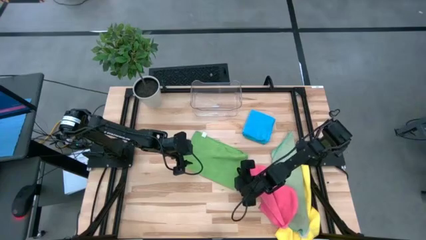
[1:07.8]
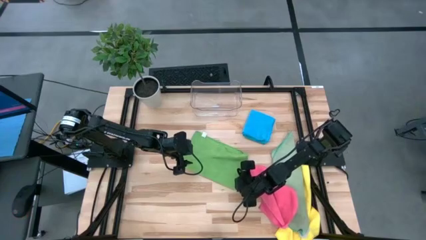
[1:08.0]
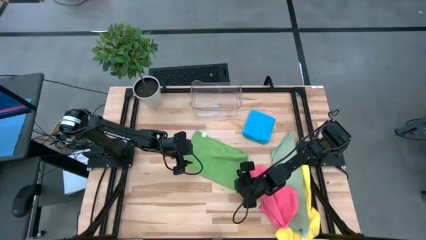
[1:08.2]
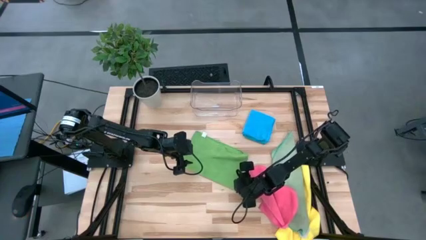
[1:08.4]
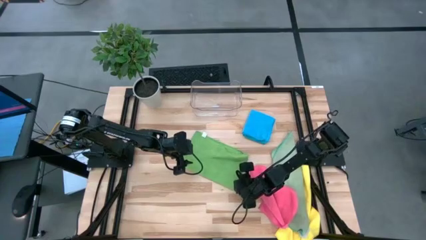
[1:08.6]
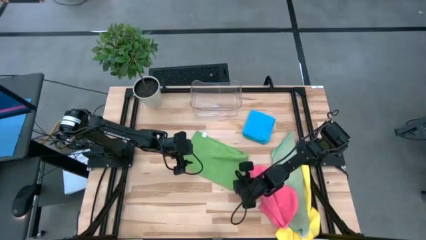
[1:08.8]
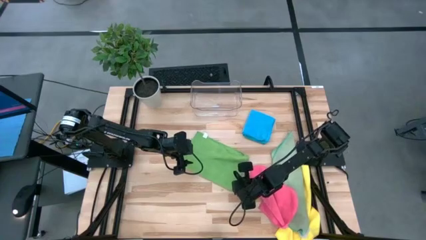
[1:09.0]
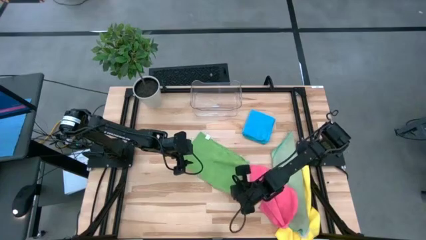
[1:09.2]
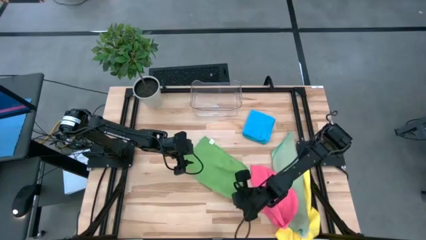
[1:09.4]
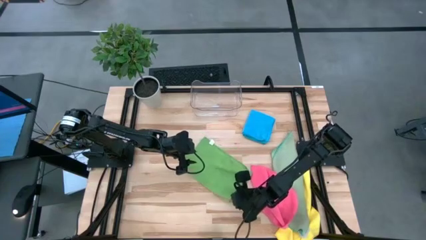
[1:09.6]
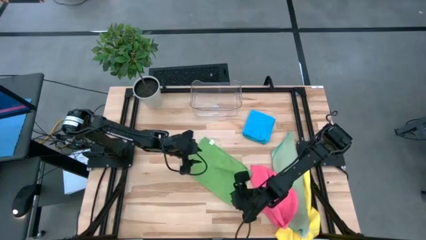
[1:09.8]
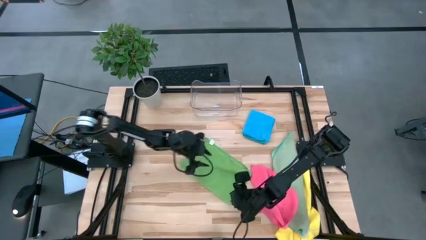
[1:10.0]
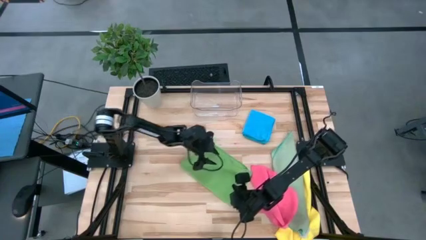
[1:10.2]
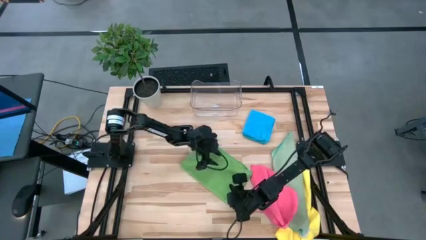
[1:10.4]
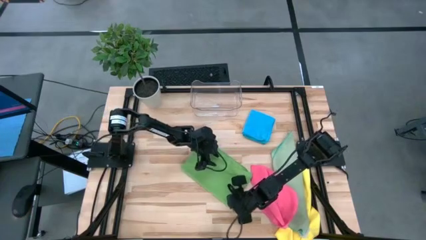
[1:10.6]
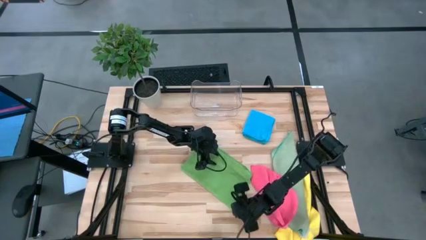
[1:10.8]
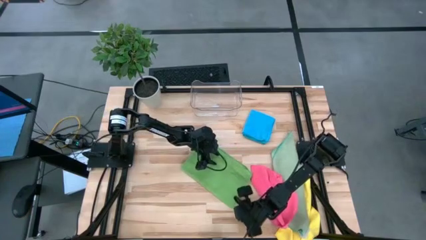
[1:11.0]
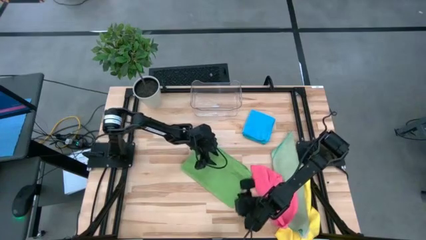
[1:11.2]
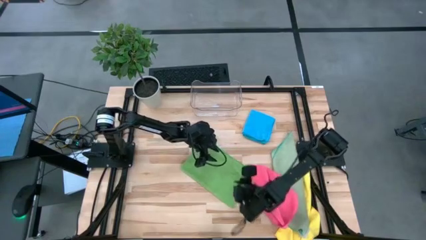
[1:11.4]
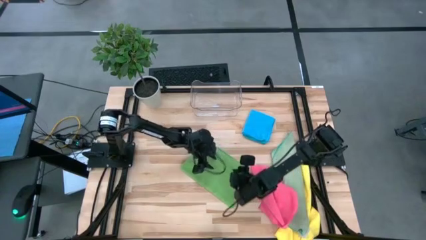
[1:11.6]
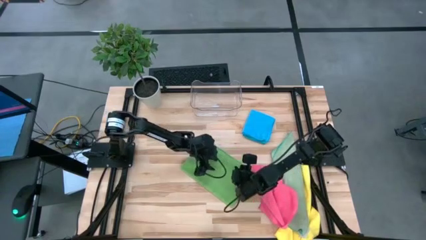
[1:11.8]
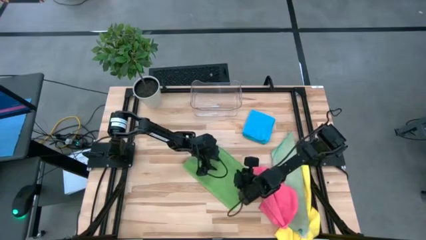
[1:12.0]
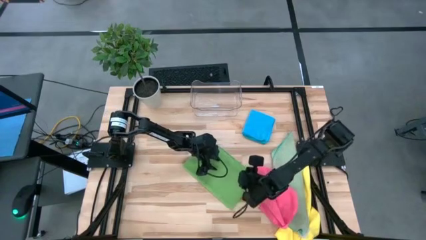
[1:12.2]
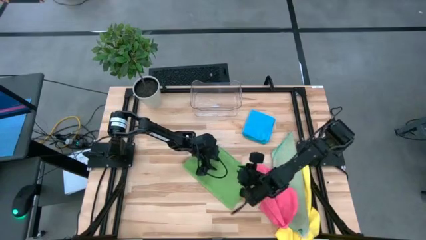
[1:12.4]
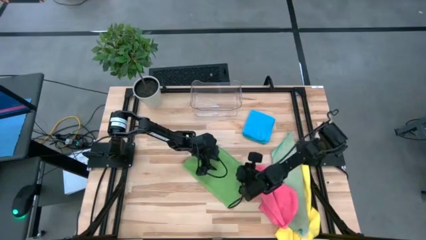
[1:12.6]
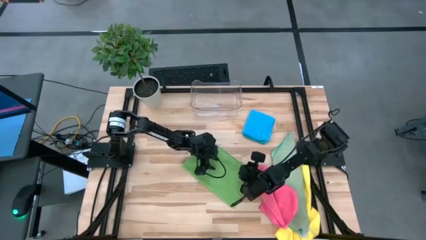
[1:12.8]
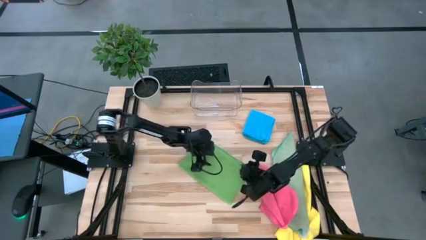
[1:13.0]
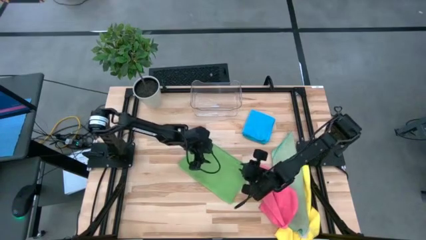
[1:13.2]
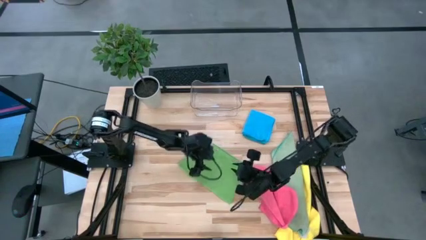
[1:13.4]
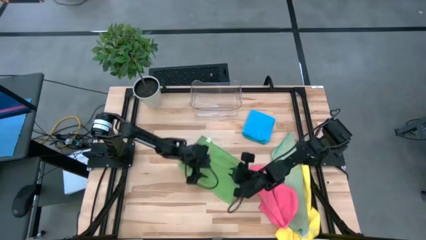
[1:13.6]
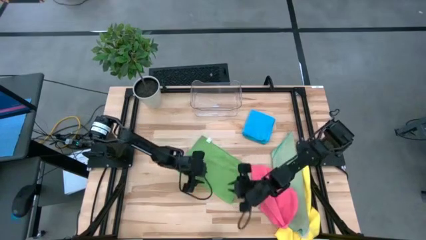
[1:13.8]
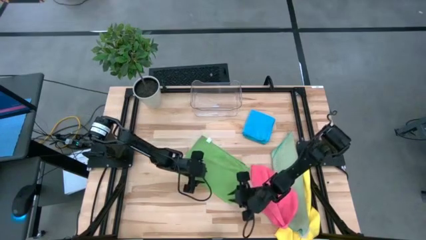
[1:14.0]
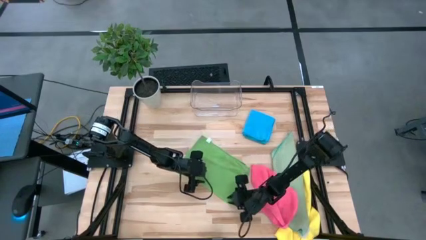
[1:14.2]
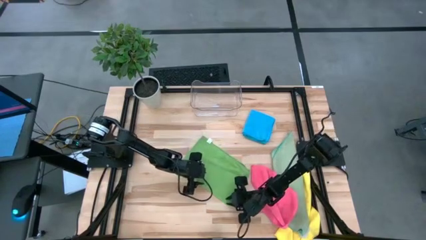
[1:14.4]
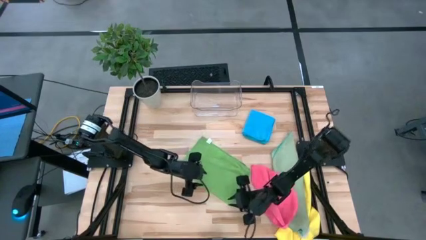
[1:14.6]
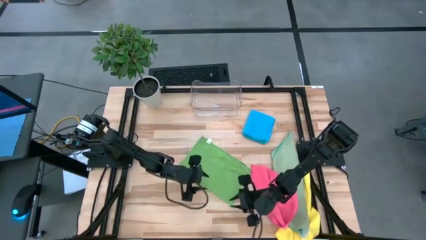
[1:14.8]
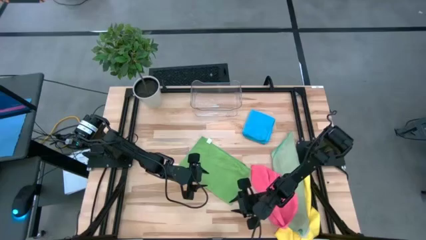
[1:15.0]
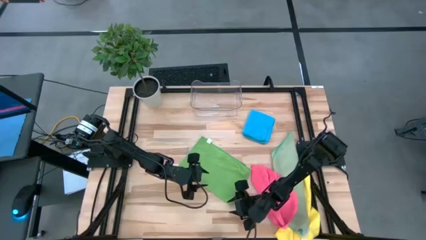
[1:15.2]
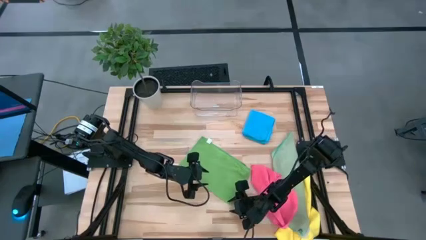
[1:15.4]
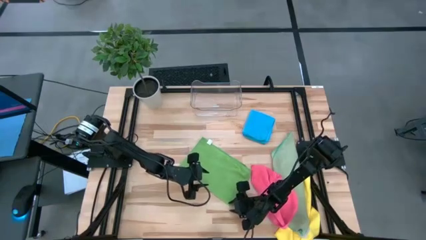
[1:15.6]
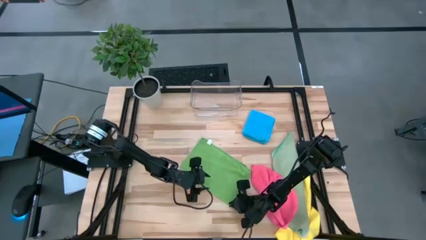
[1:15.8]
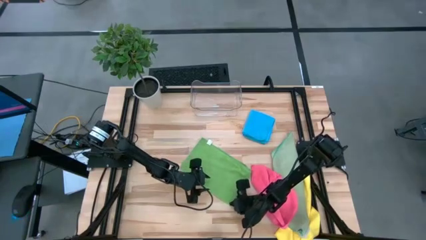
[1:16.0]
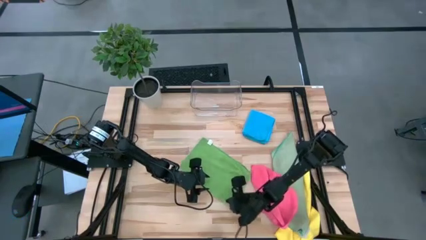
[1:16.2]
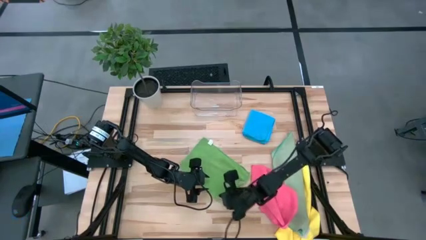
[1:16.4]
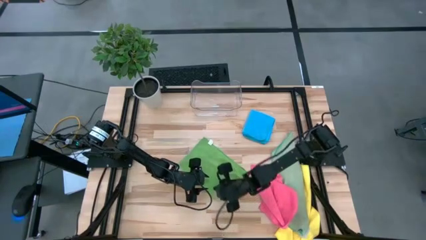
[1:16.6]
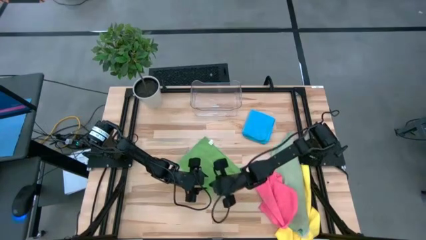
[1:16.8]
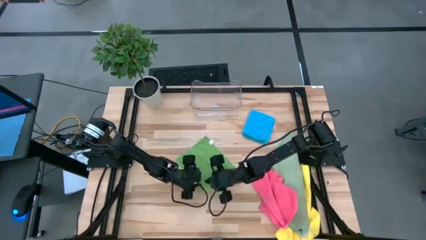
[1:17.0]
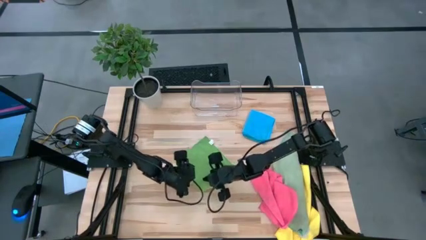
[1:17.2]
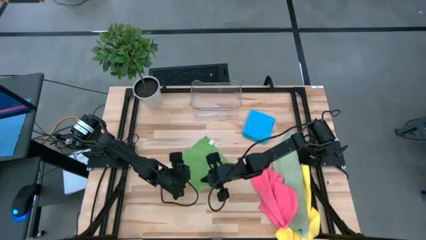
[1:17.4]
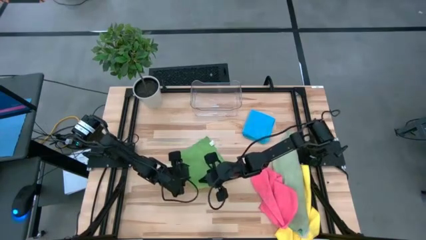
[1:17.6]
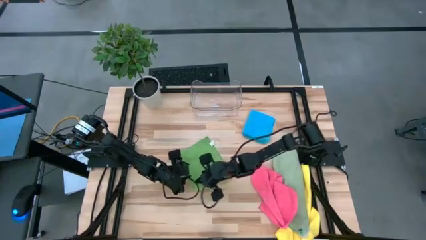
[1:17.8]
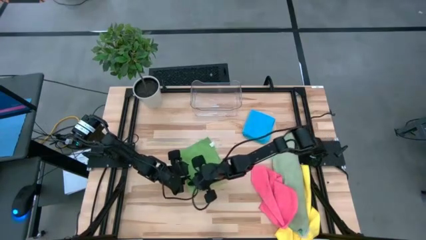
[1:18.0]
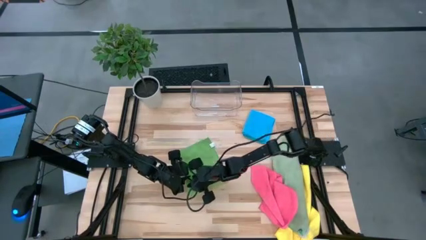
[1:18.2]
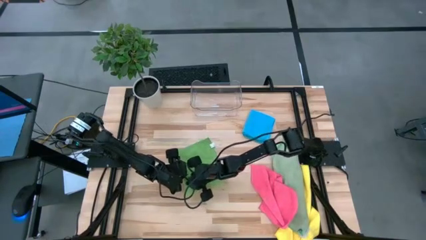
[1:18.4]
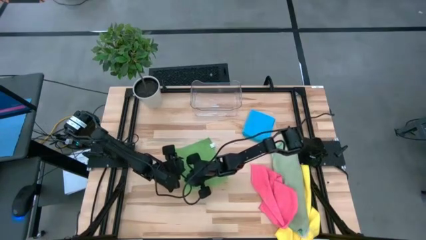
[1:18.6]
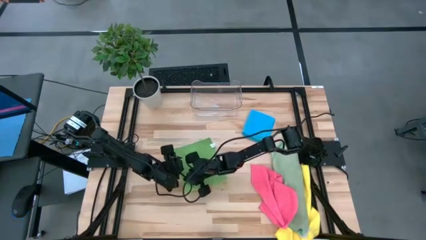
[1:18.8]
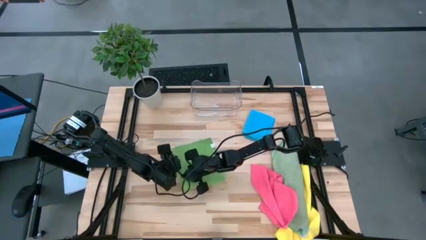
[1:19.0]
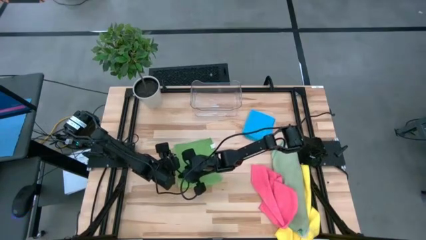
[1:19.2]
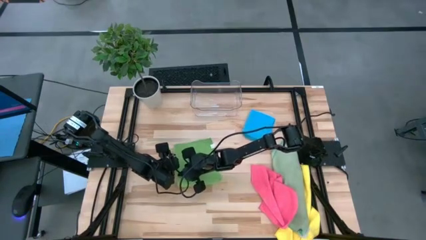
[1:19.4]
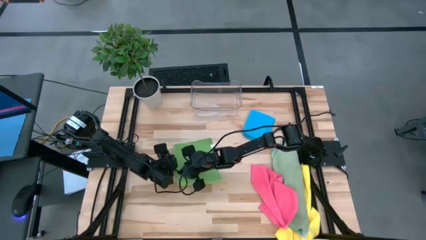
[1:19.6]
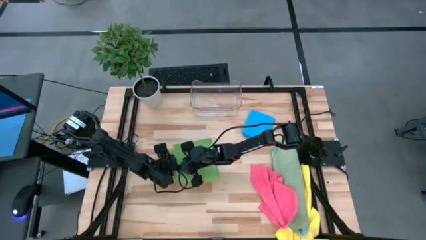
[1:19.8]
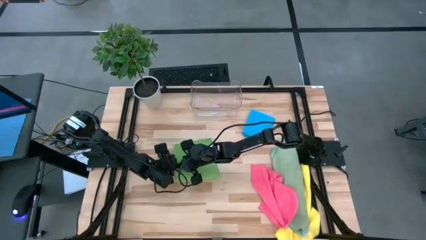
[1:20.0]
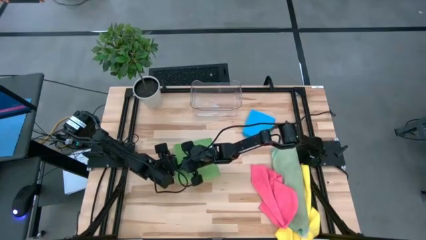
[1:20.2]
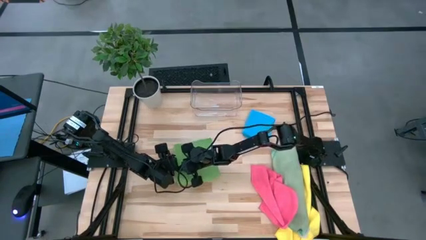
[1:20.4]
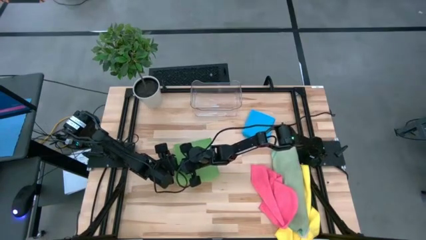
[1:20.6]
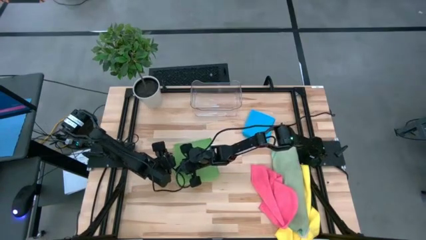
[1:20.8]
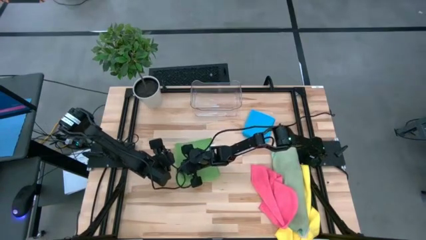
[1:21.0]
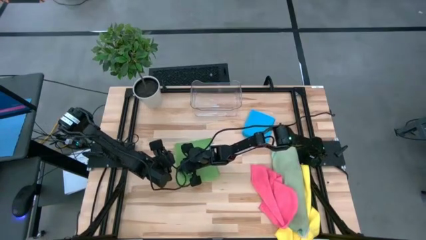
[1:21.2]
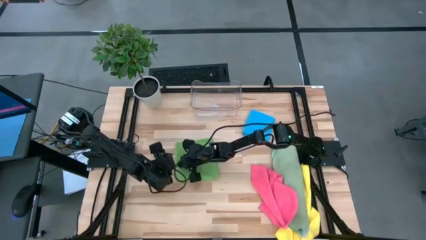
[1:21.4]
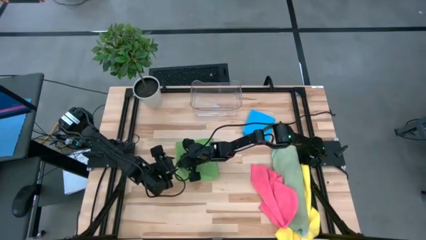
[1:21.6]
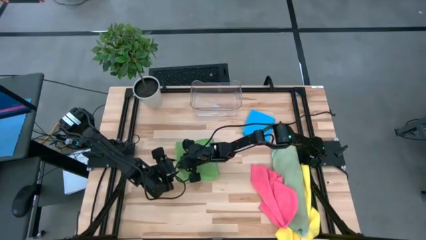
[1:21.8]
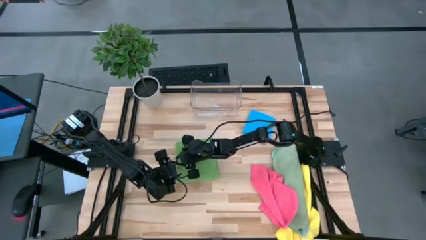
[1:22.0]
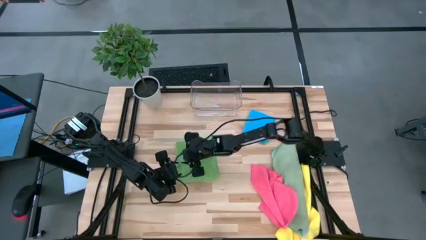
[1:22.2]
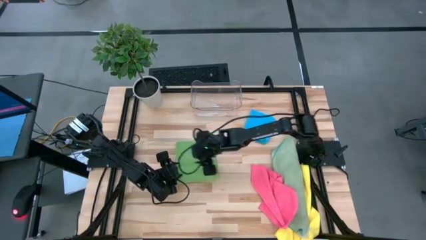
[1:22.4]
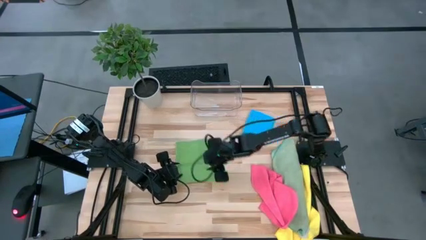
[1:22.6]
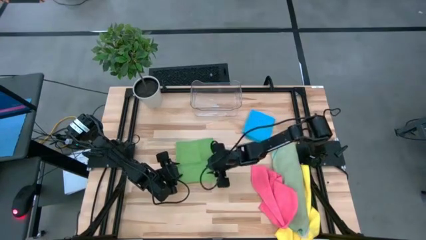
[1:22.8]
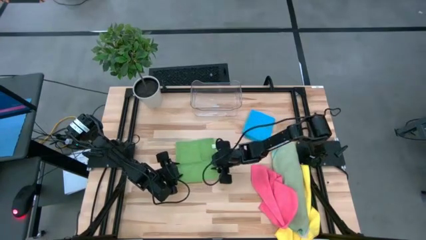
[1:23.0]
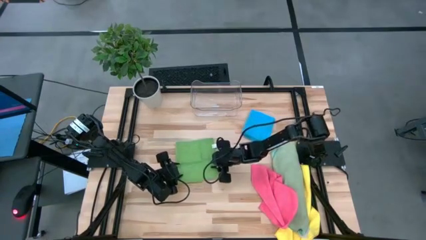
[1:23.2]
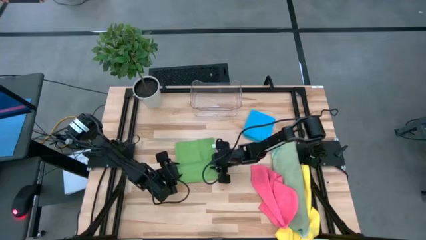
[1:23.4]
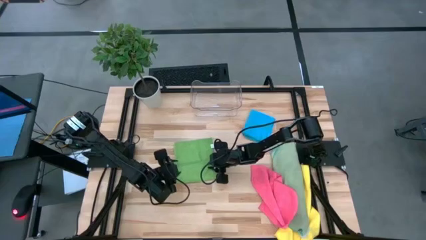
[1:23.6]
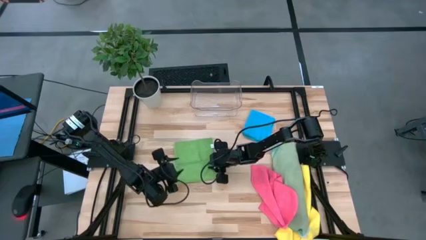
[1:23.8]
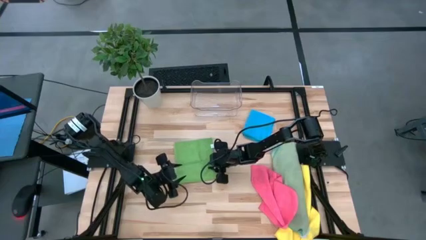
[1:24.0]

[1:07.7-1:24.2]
Task: Fold microfiber towels
Fold the green microfiber towel
